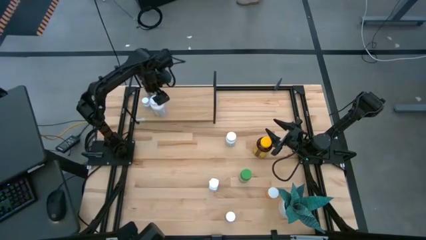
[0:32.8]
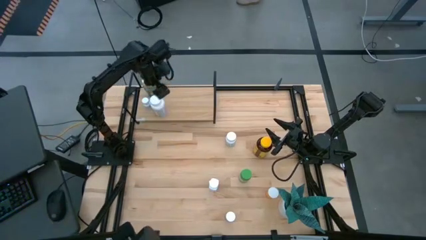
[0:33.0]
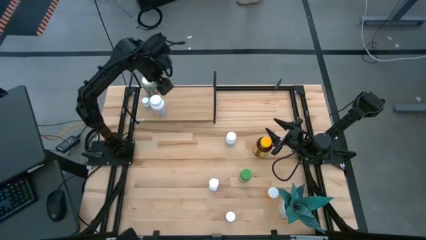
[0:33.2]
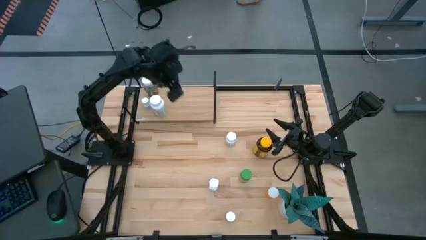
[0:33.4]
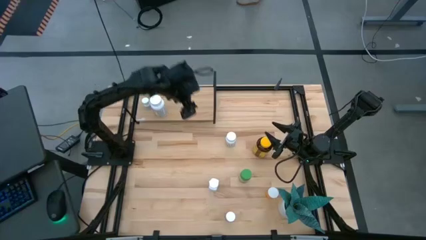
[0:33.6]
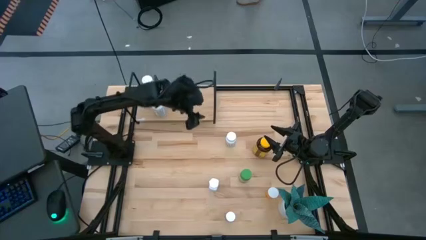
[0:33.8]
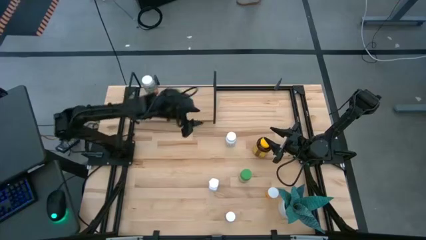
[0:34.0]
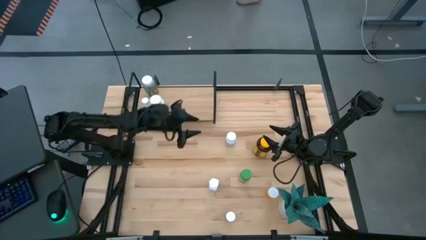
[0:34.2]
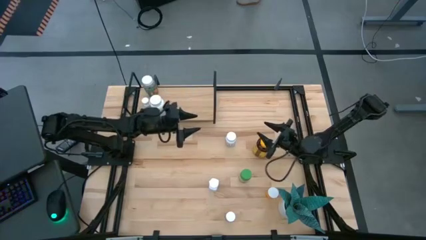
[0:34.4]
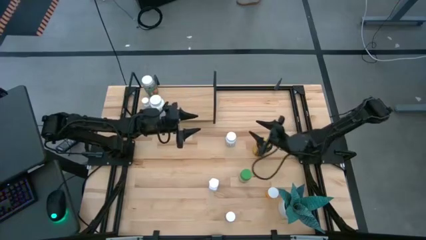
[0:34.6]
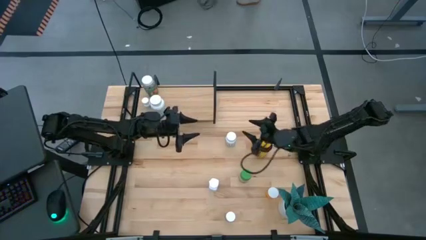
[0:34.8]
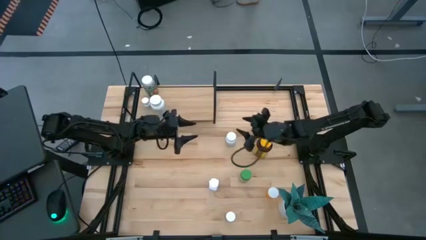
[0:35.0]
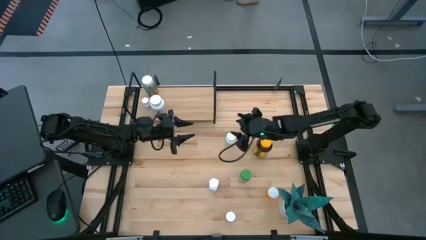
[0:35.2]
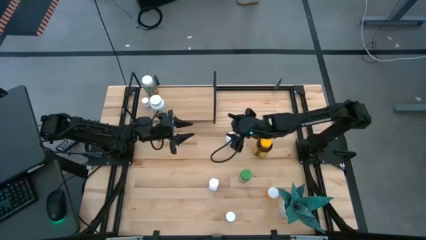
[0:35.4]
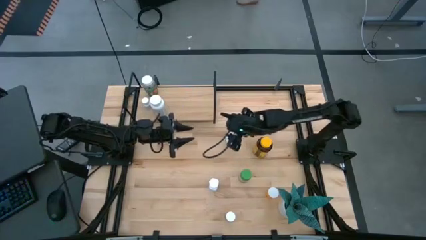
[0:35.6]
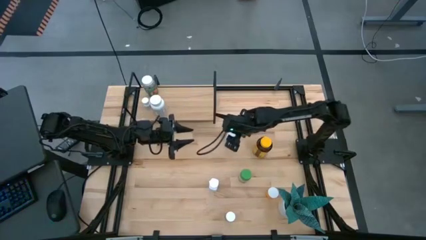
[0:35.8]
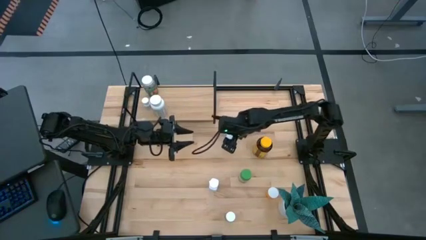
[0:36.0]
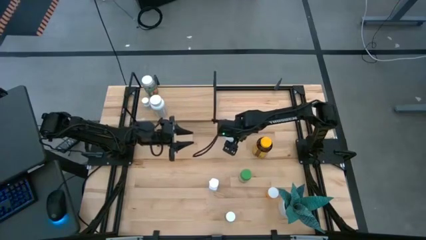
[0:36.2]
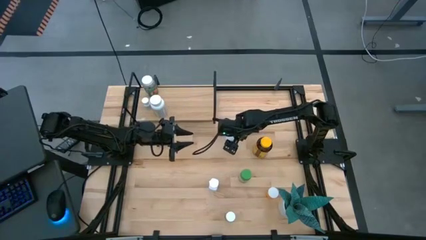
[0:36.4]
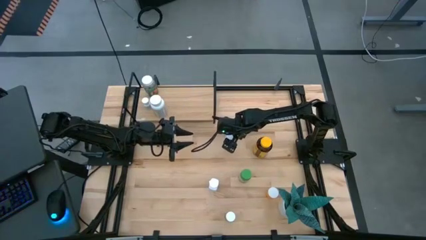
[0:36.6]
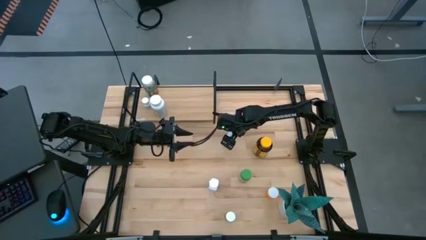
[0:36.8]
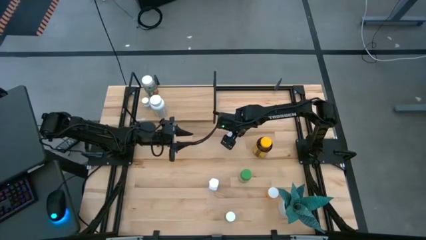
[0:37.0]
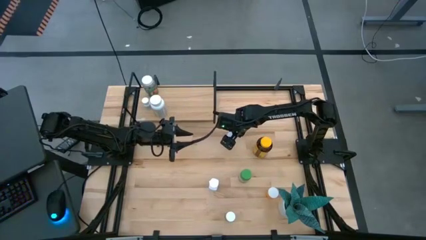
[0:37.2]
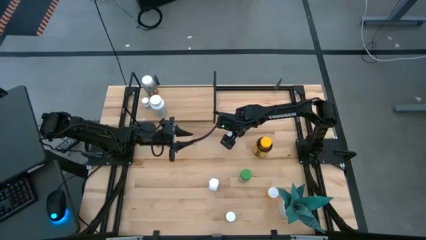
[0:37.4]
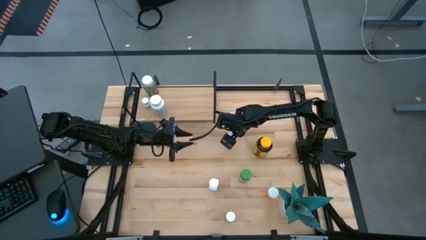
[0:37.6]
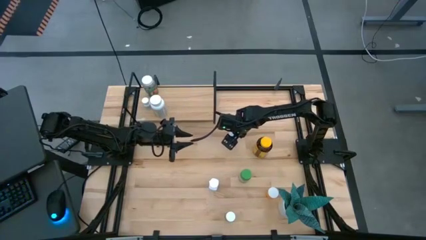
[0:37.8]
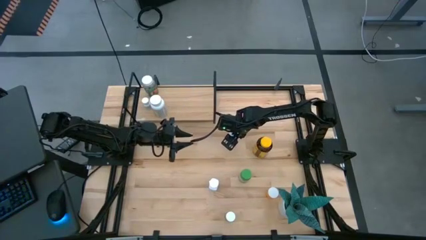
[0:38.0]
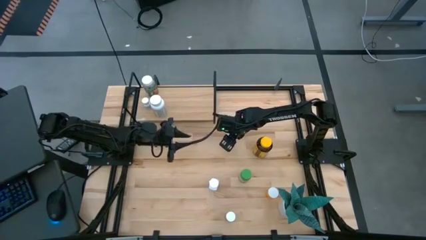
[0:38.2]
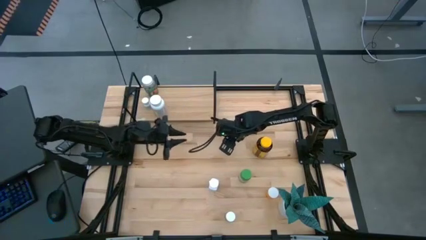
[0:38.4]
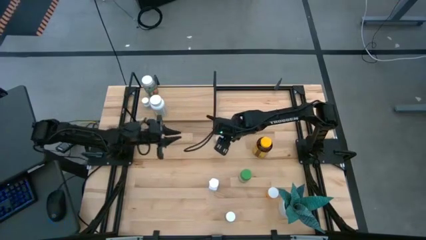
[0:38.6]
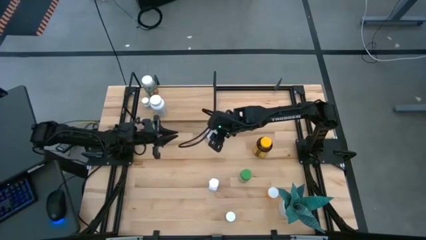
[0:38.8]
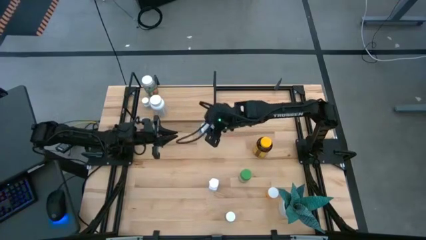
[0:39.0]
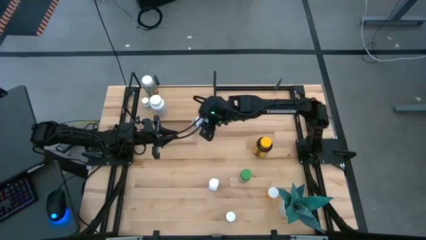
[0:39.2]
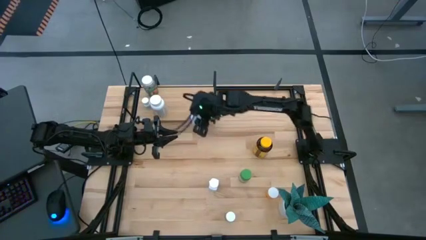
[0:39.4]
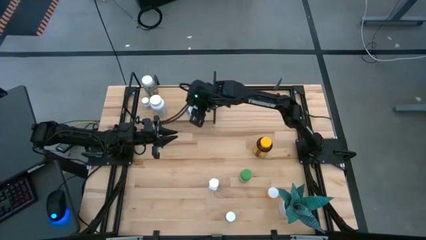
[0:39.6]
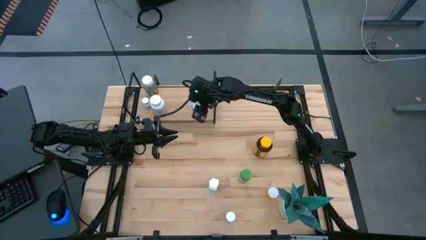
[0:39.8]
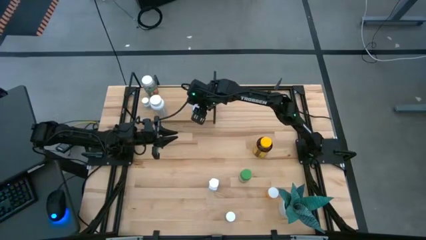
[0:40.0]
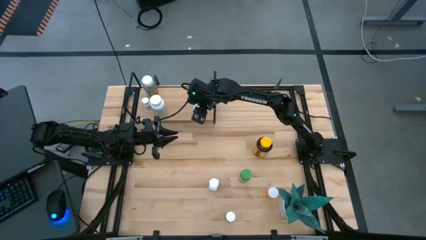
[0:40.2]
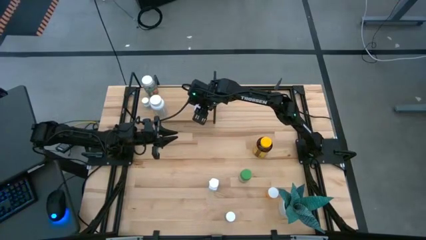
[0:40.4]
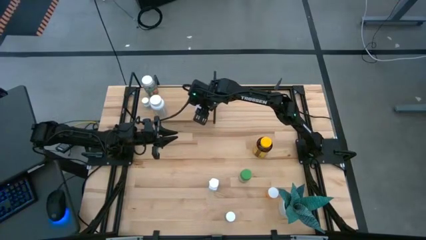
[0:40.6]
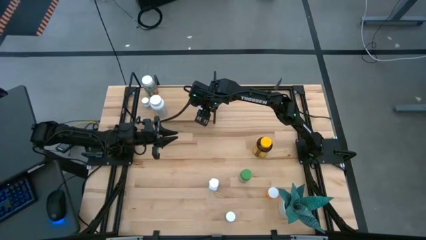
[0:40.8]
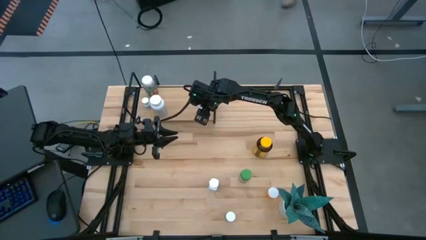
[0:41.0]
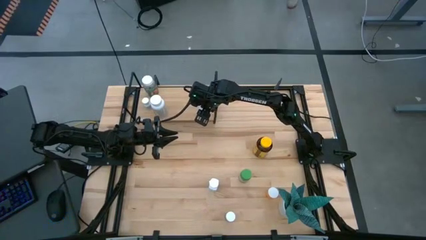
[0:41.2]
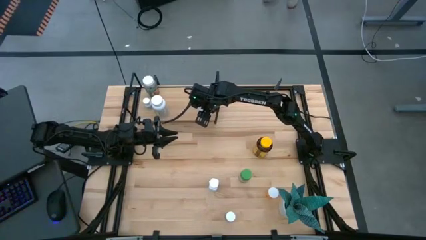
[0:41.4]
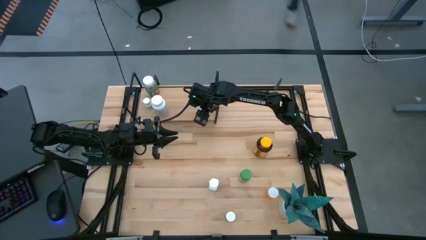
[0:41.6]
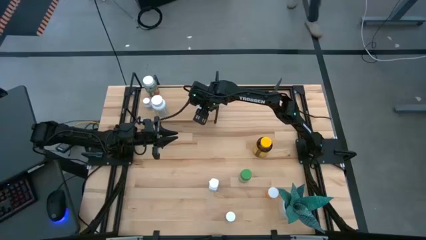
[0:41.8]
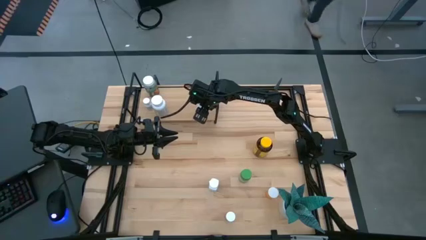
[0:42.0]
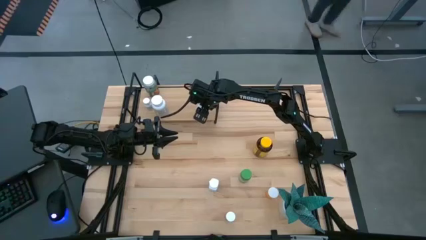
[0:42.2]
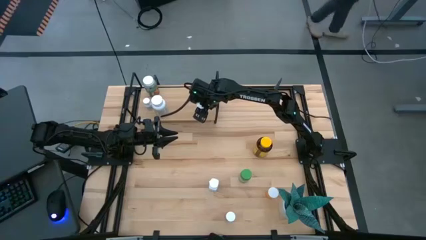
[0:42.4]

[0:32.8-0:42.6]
Task: Pick and place medicine bottles onto shelf by color
Put the white pill bottle on the shelf
